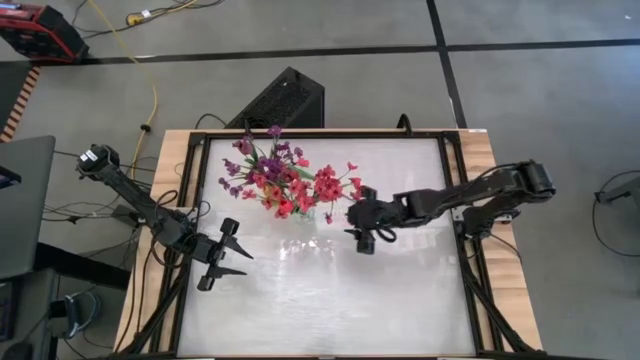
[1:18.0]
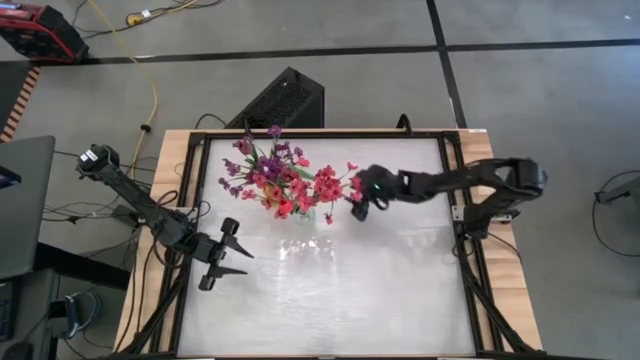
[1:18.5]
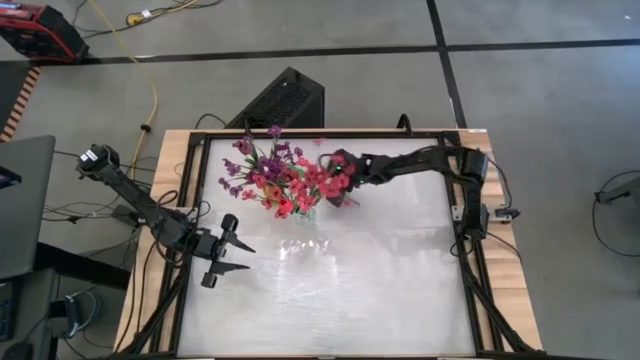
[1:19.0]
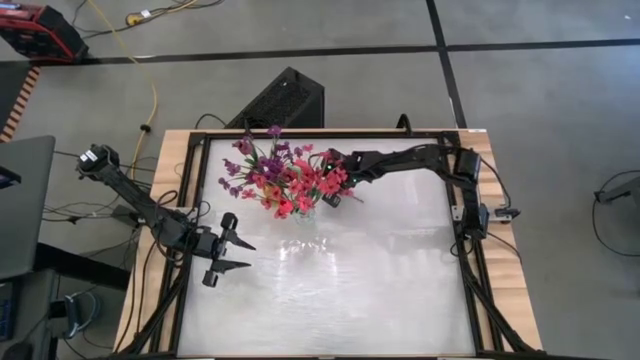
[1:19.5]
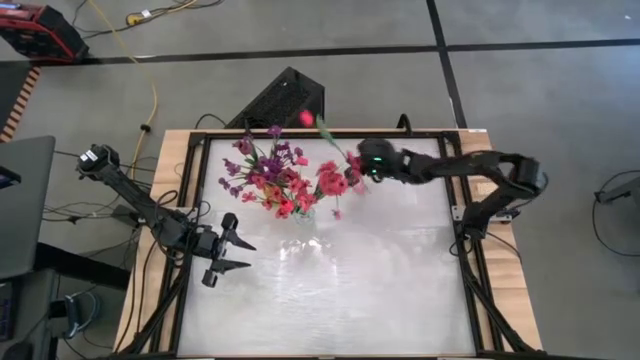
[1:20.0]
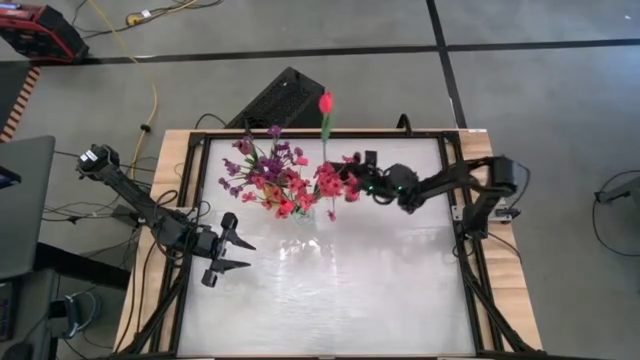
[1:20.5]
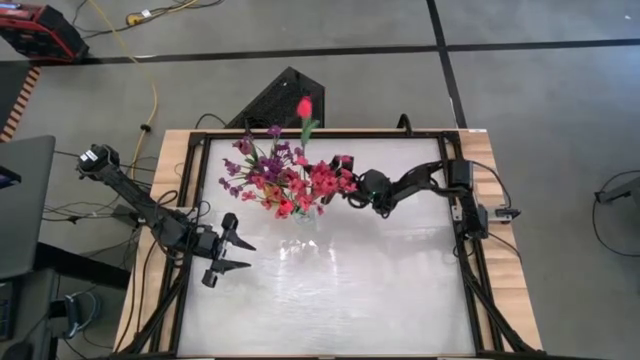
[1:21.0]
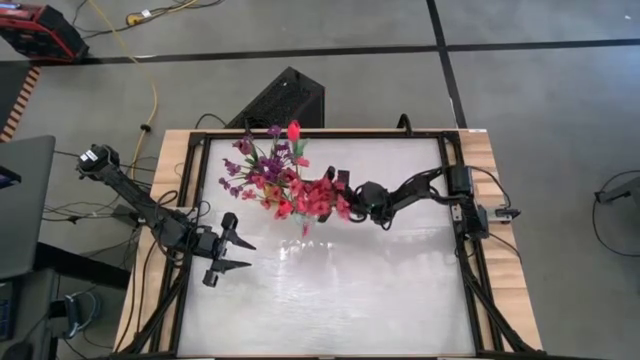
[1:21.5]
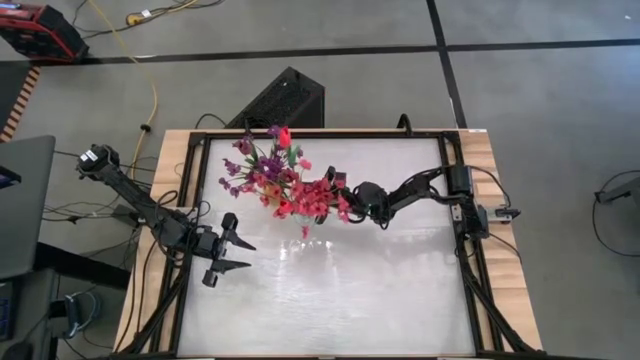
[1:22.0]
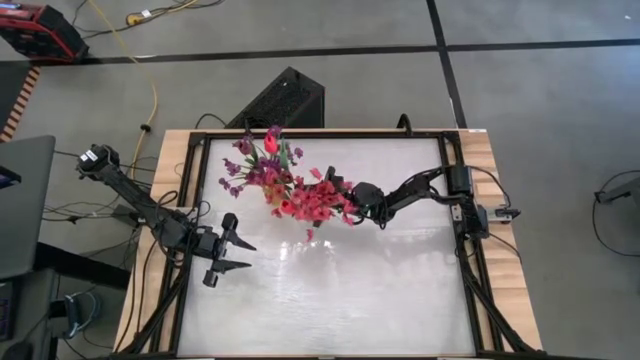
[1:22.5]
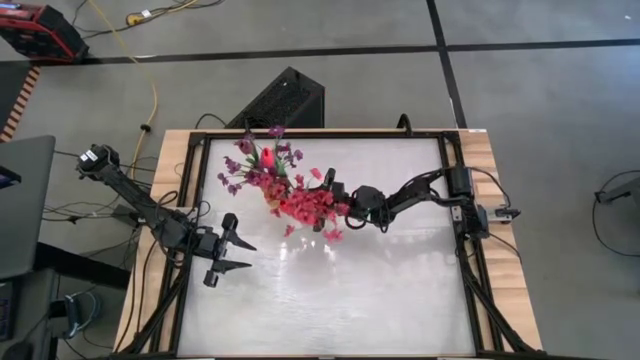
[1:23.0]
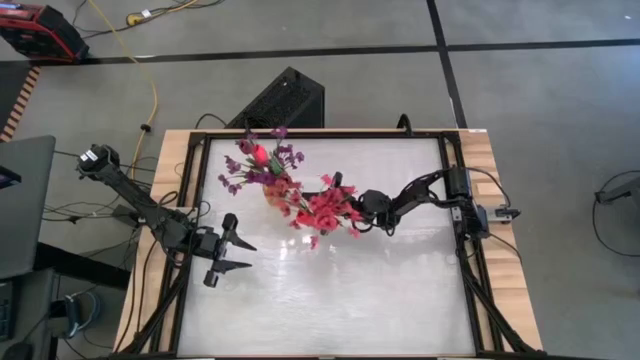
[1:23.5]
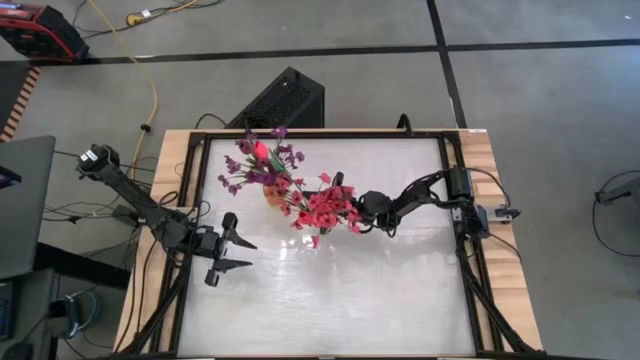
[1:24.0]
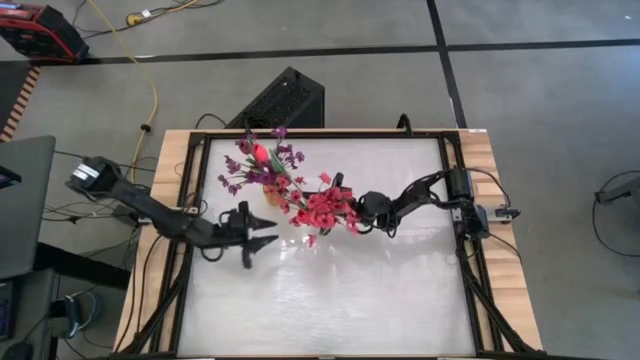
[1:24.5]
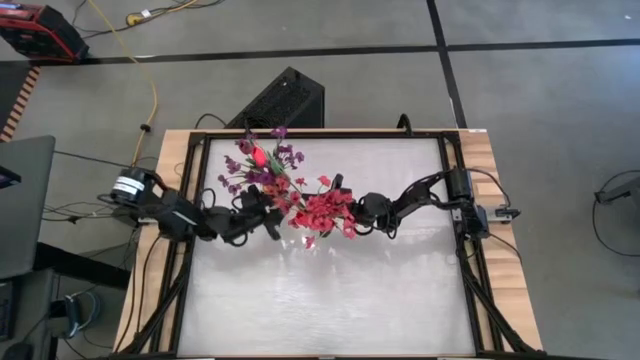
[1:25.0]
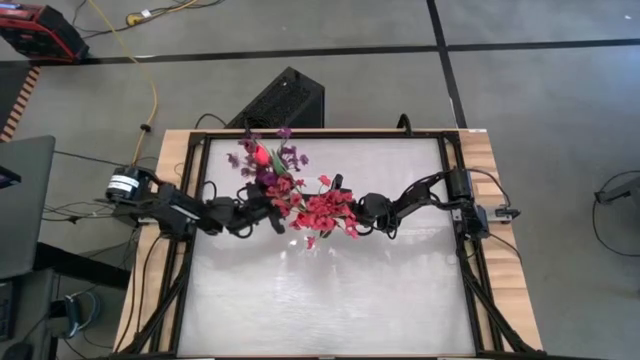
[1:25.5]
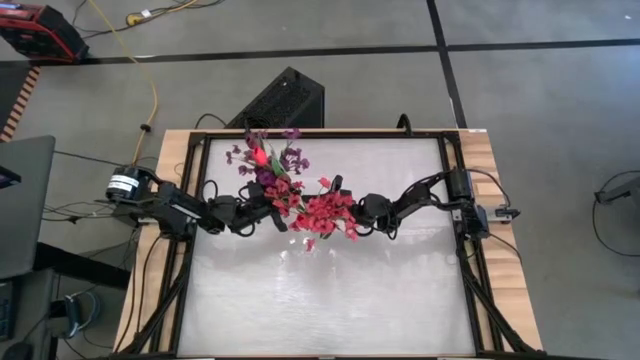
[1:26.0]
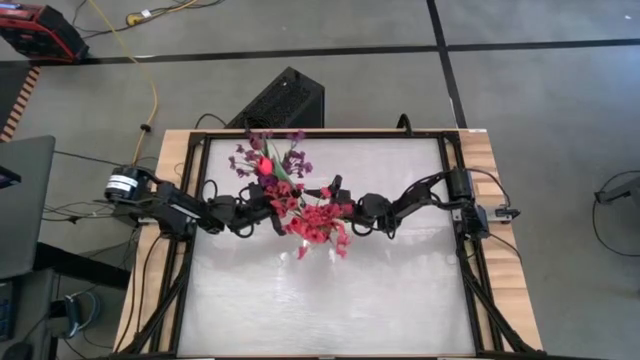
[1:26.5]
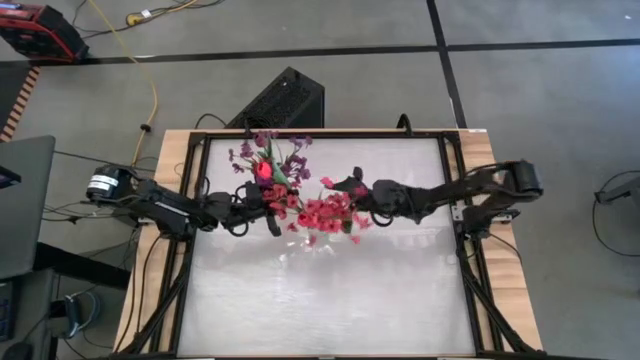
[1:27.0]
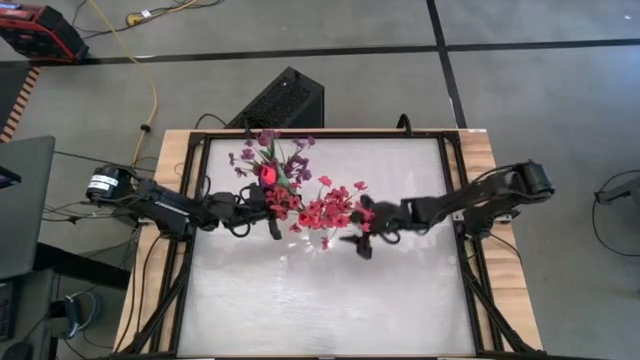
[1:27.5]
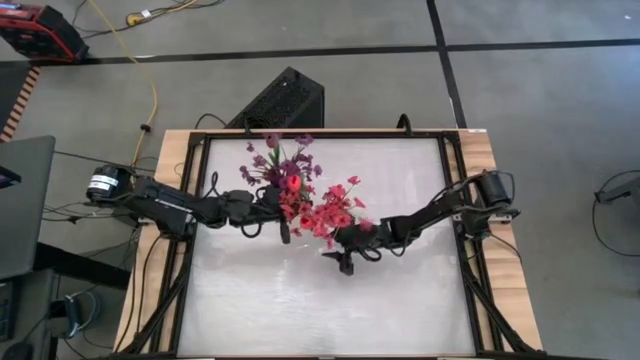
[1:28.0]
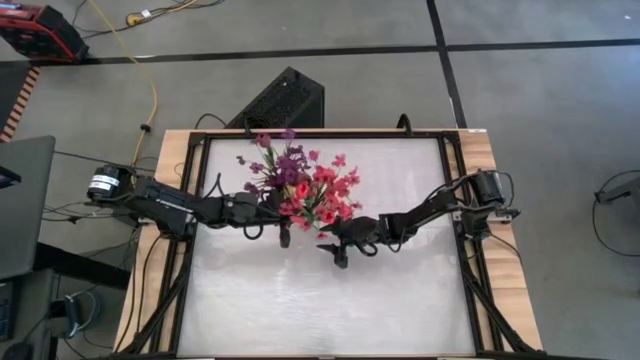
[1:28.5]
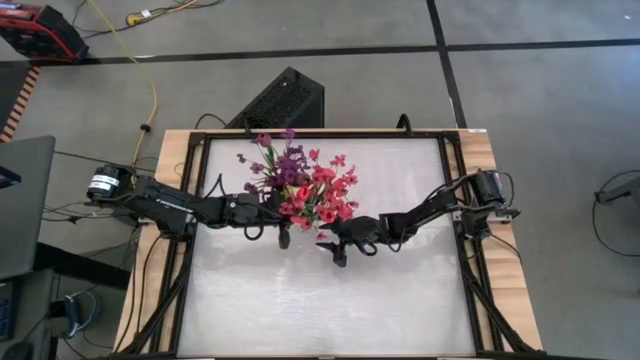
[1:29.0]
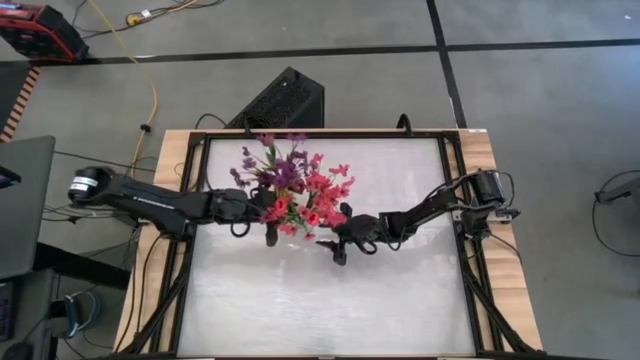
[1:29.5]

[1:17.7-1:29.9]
Task: Sort flowers into vase by color
Put the red tulip into the transparent vase

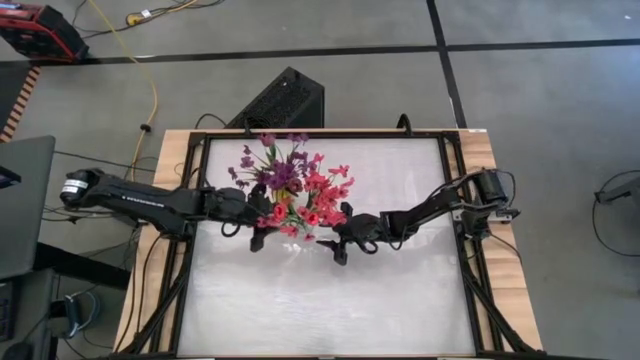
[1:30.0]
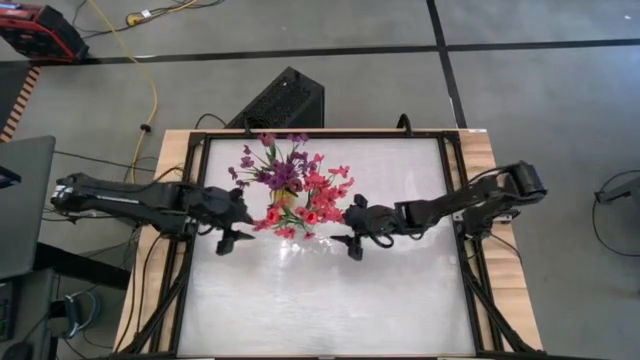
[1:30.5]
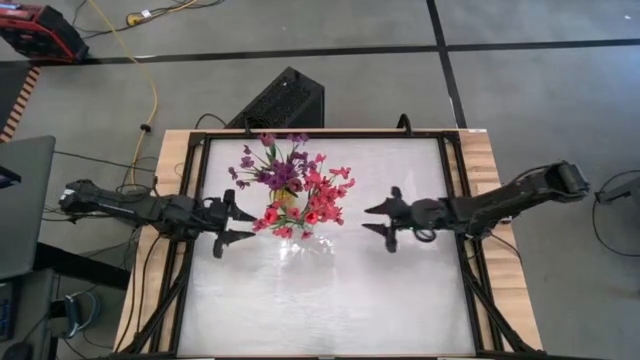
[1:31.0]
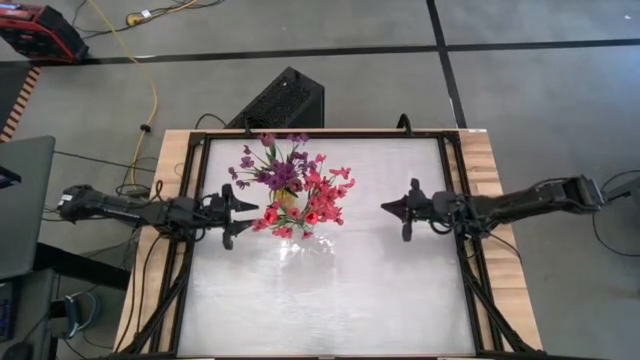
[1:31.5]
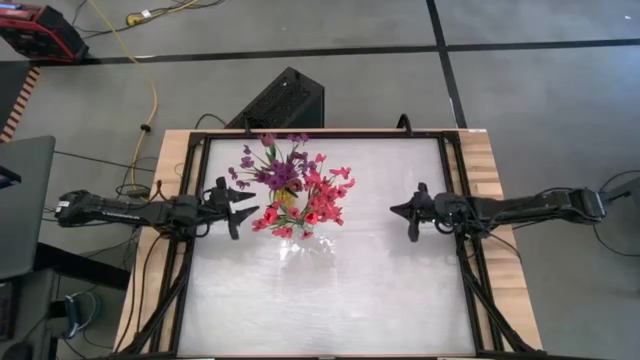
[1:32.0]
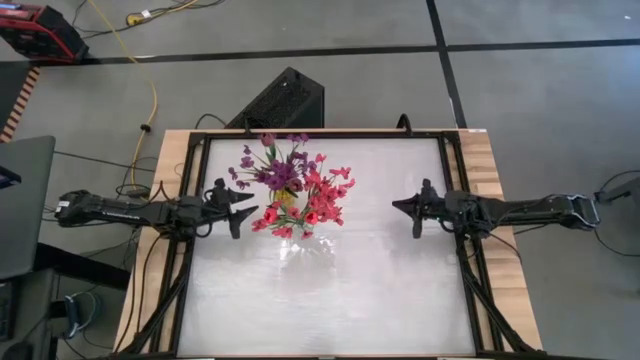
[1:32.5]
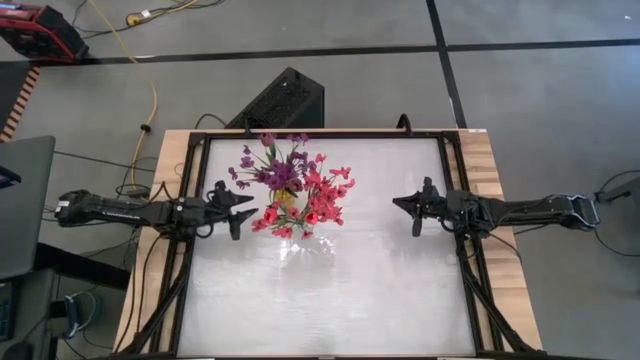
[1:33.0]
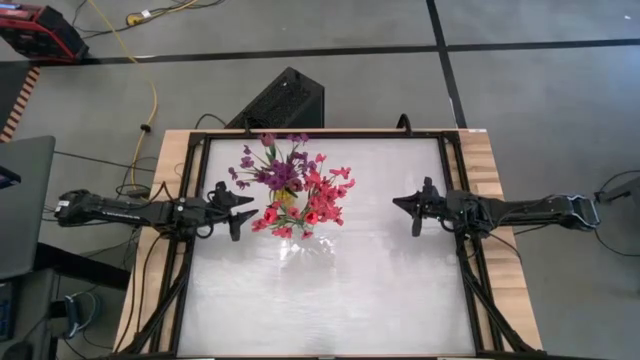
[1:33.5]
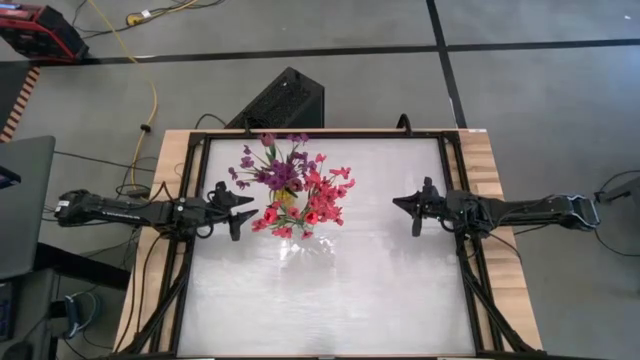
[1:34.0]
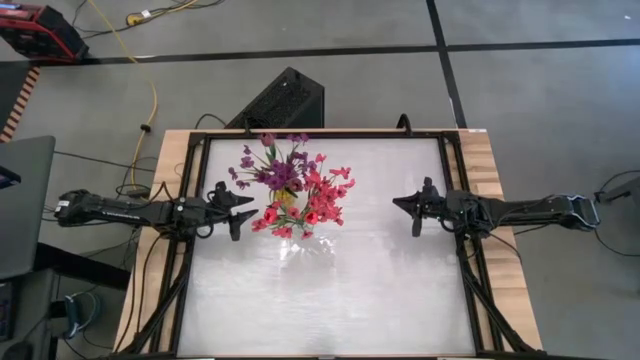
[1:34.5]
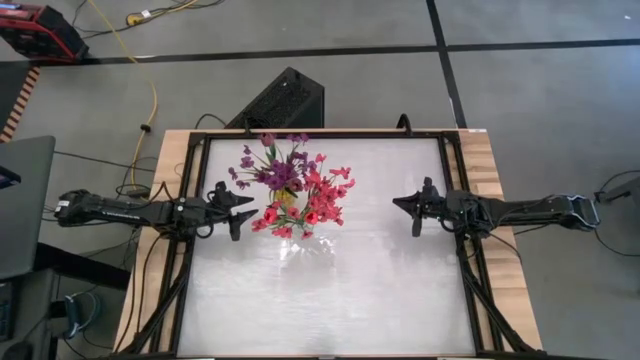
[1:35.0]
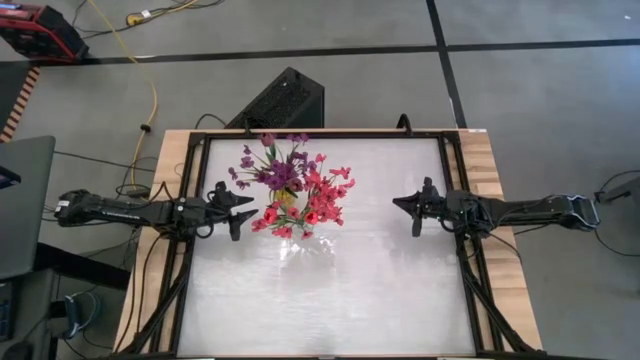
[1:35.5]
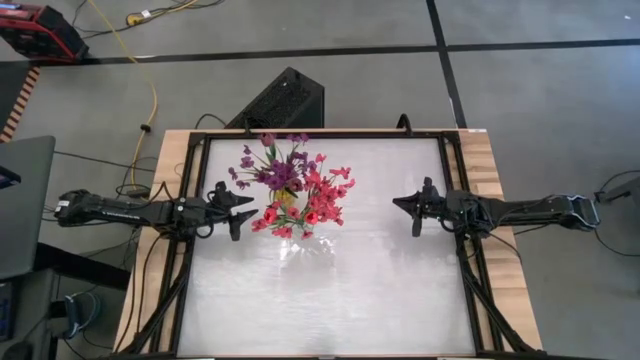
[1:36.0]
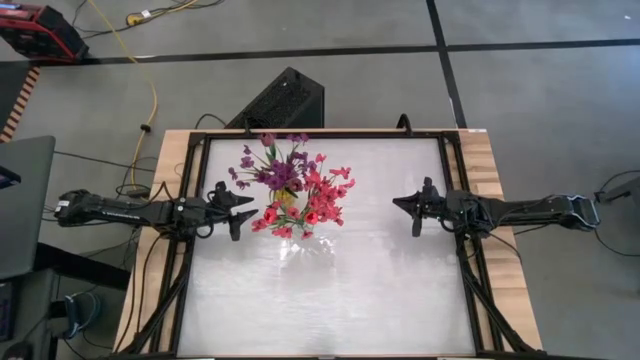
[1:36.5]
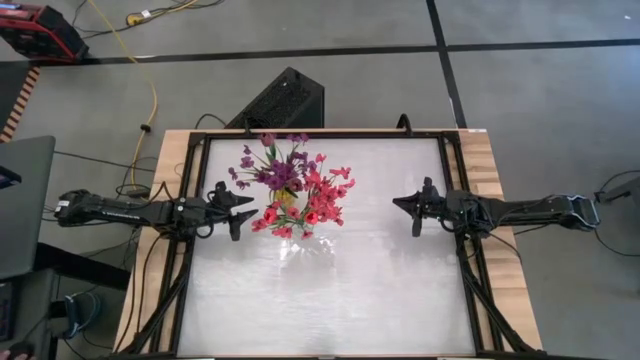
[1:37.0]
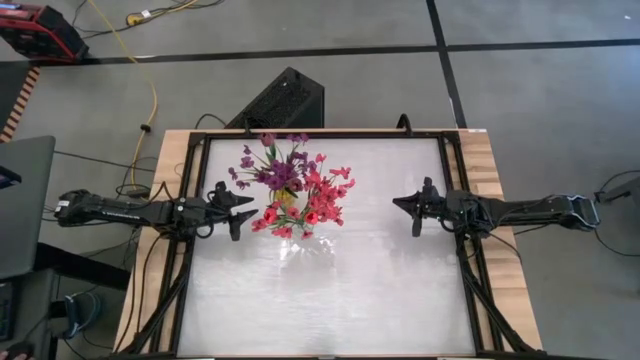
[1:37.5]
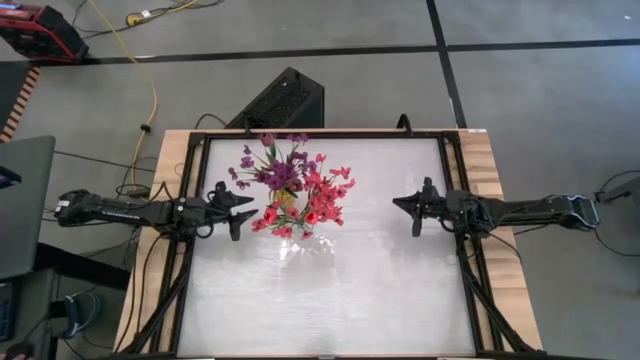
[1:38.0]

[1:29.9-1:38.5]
Return to Home Position

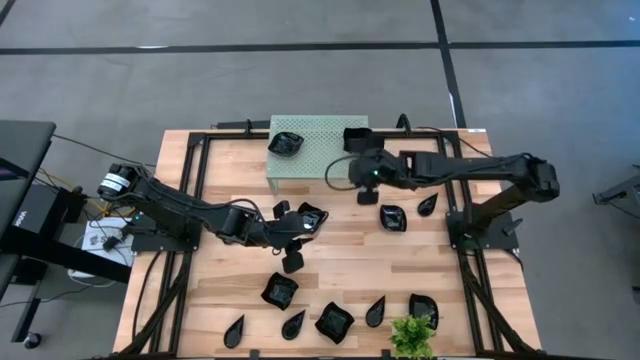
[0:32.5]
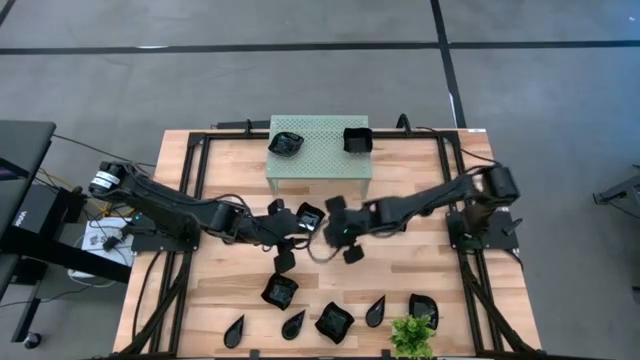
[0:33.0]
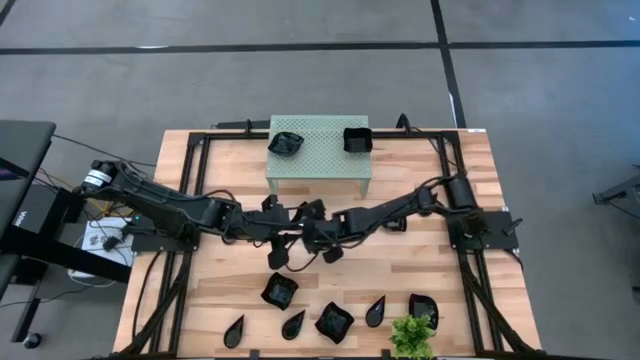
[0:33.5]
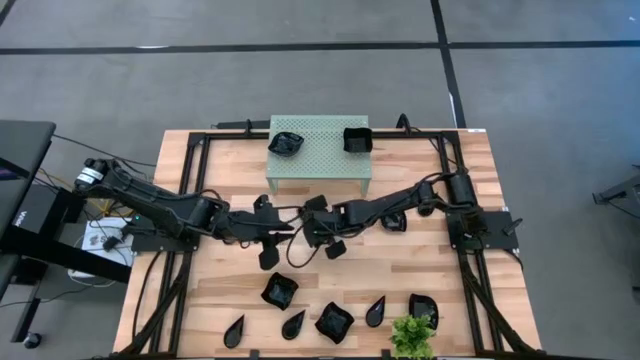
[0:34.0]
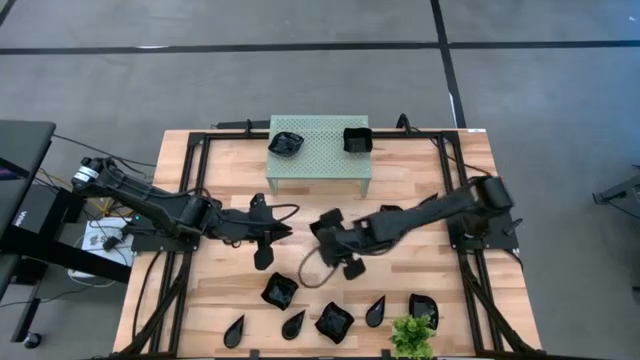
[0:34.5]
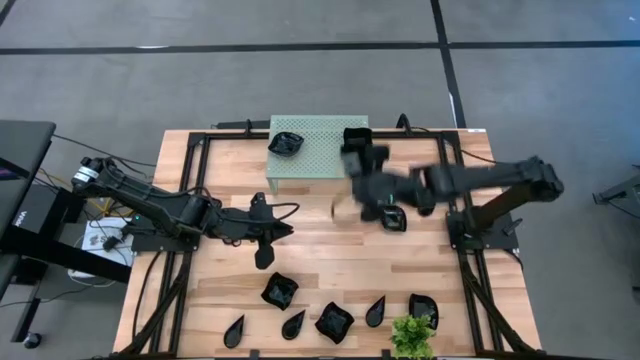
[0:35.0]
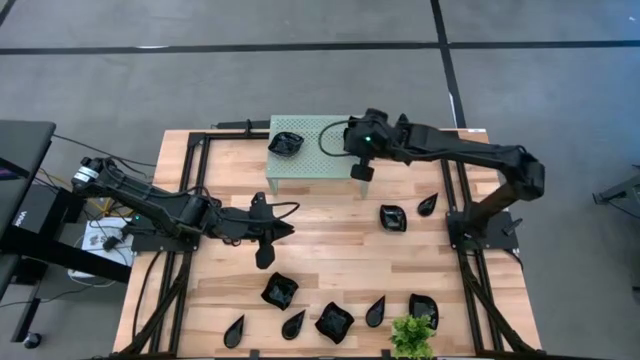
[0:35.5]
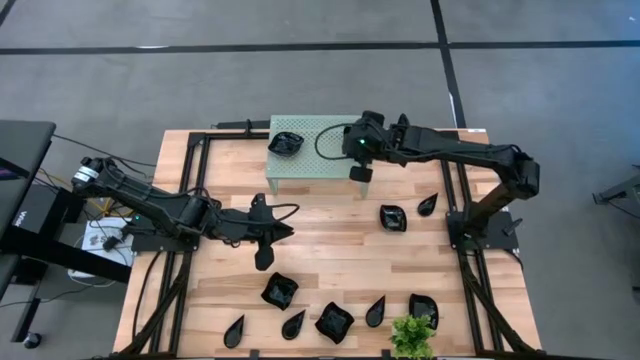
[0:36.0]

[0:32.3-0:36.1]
Task: Pick & Place Mini shaped plates
Stack the distorted square plate on top of the other distorted square plates on the shelf
